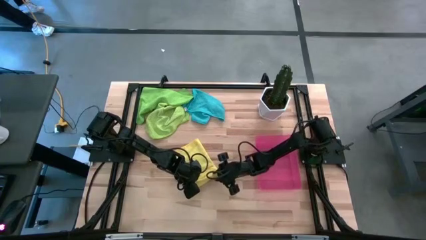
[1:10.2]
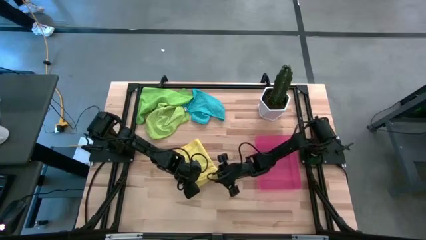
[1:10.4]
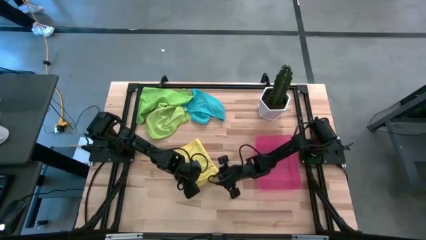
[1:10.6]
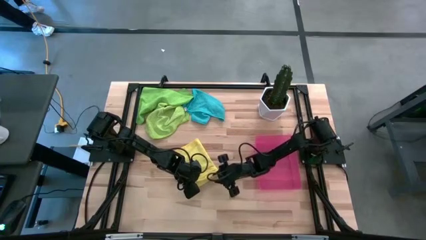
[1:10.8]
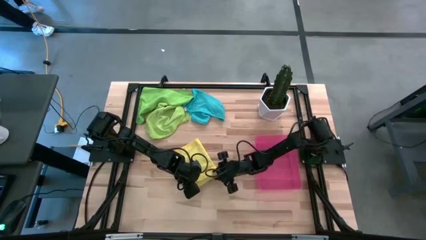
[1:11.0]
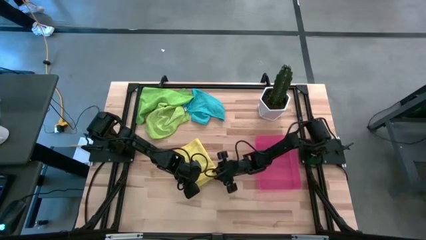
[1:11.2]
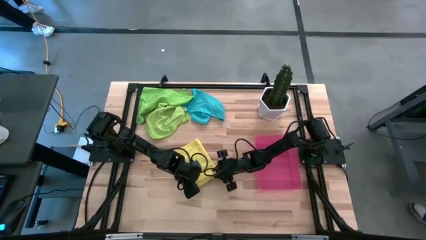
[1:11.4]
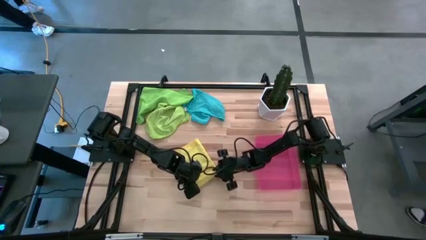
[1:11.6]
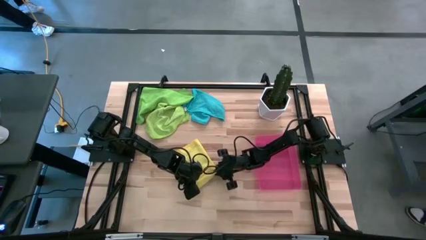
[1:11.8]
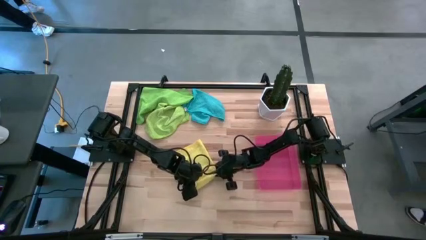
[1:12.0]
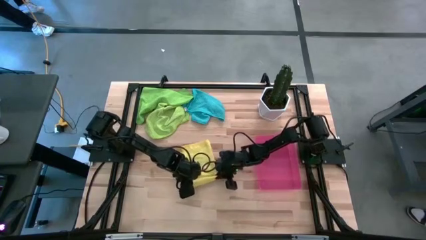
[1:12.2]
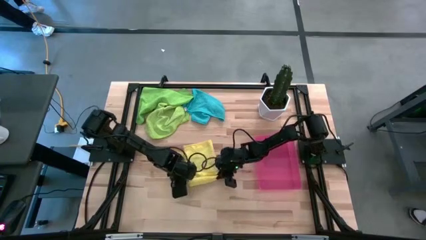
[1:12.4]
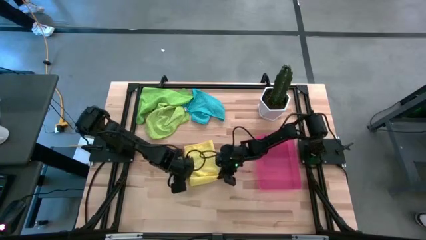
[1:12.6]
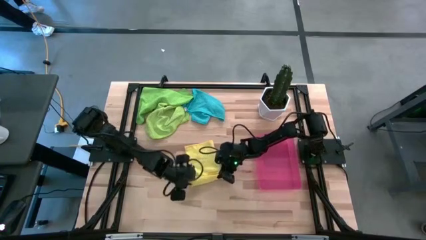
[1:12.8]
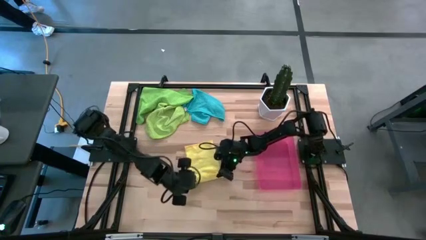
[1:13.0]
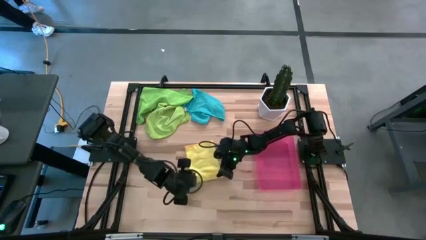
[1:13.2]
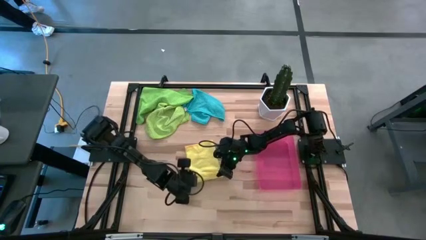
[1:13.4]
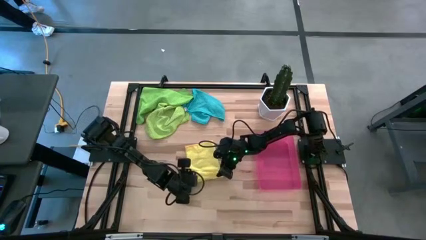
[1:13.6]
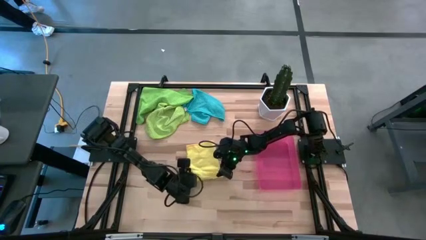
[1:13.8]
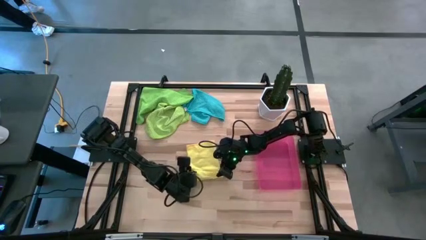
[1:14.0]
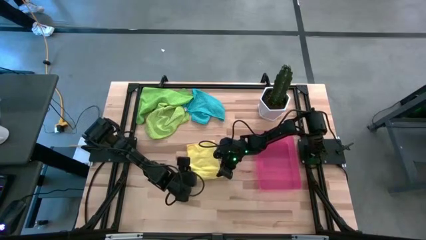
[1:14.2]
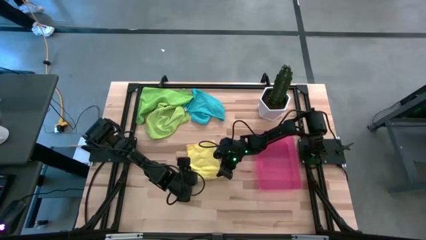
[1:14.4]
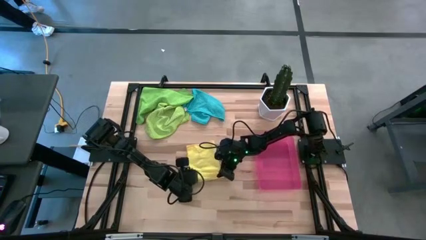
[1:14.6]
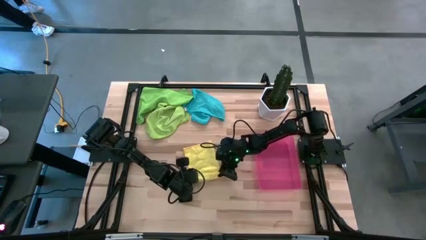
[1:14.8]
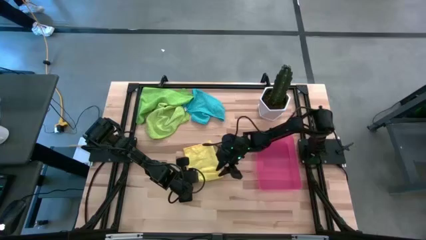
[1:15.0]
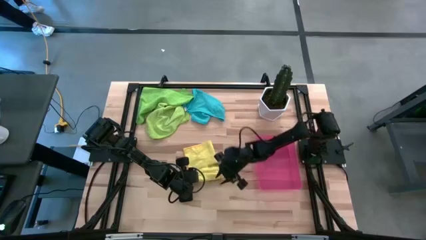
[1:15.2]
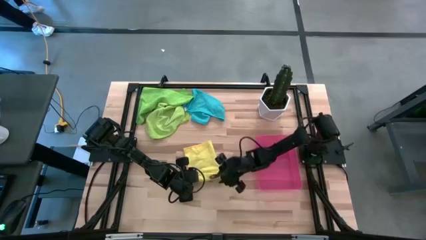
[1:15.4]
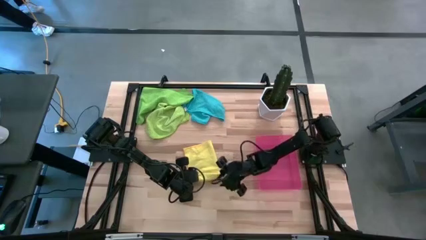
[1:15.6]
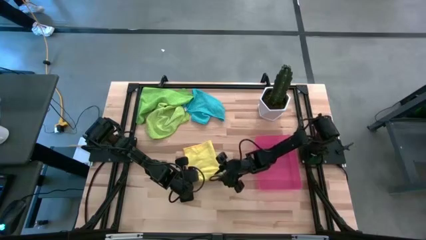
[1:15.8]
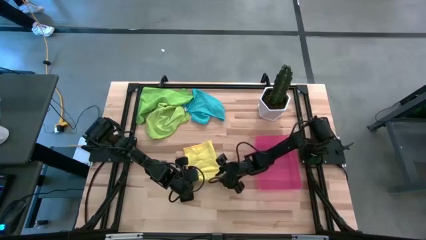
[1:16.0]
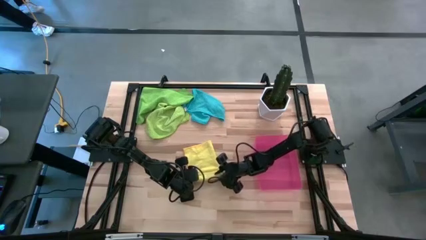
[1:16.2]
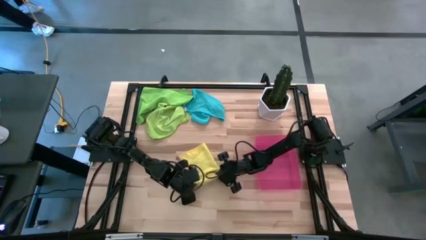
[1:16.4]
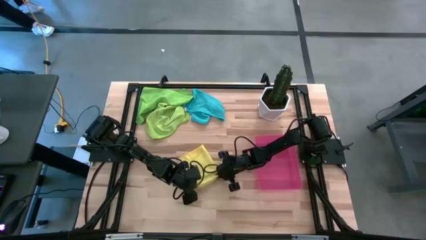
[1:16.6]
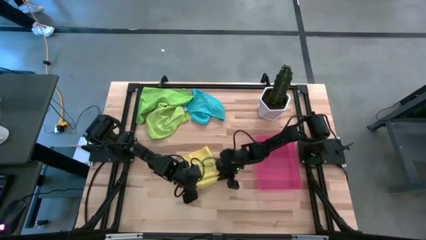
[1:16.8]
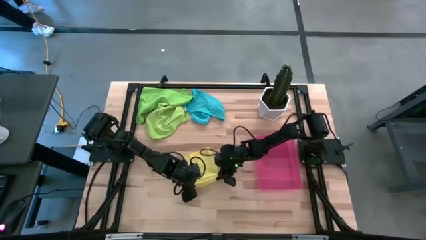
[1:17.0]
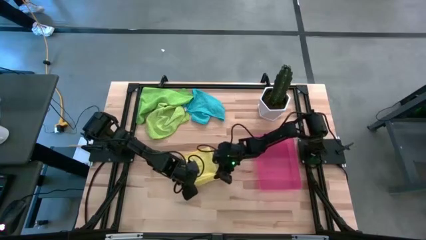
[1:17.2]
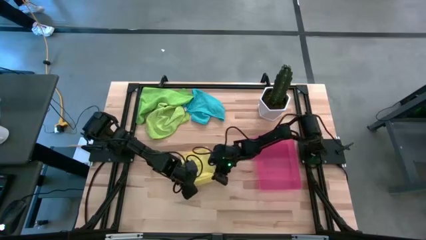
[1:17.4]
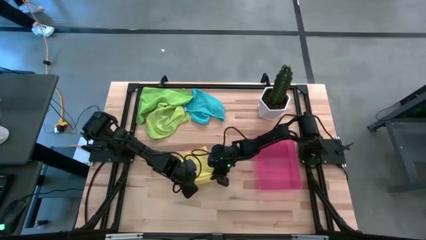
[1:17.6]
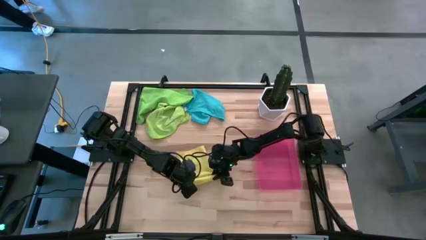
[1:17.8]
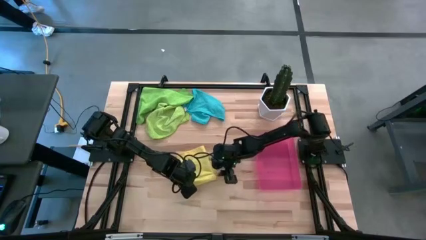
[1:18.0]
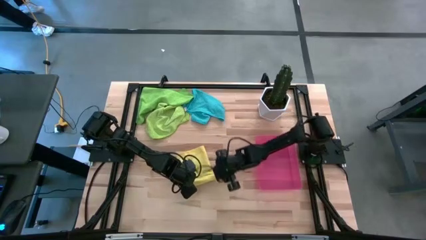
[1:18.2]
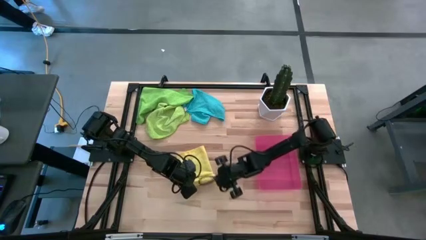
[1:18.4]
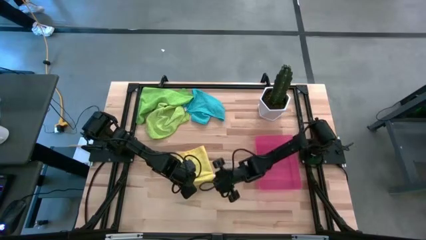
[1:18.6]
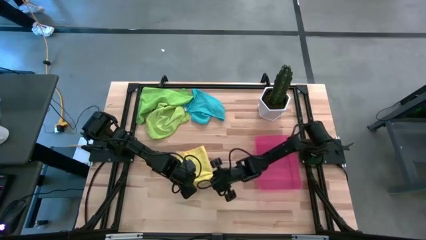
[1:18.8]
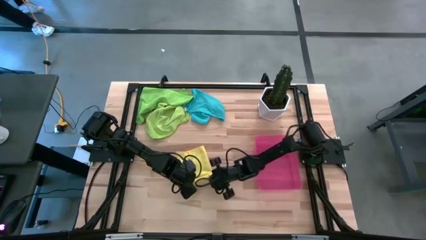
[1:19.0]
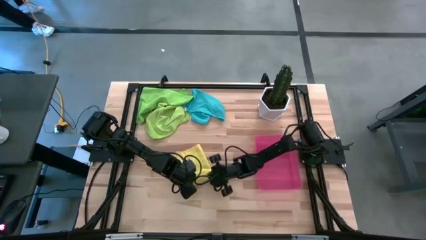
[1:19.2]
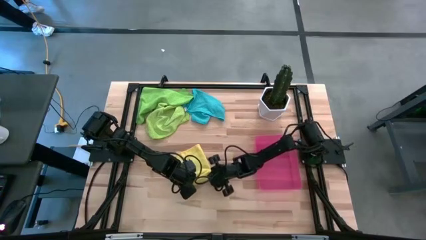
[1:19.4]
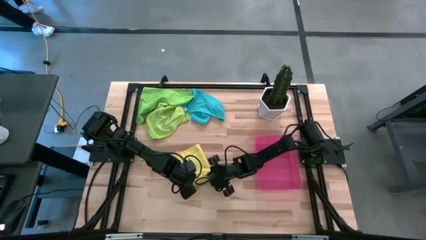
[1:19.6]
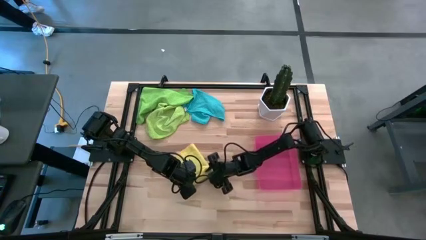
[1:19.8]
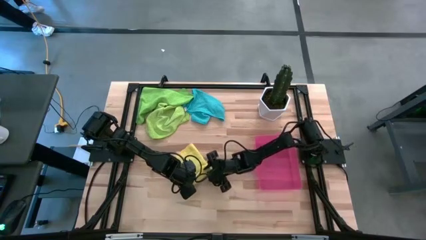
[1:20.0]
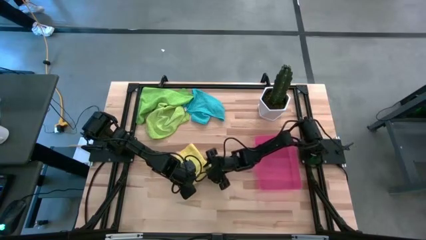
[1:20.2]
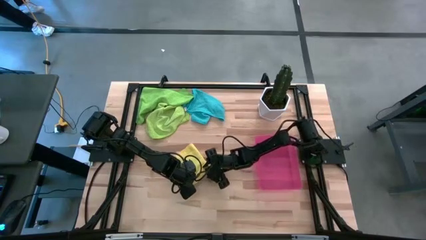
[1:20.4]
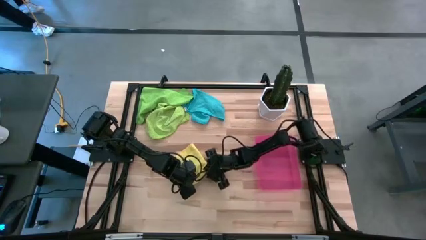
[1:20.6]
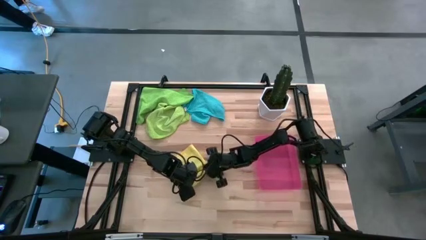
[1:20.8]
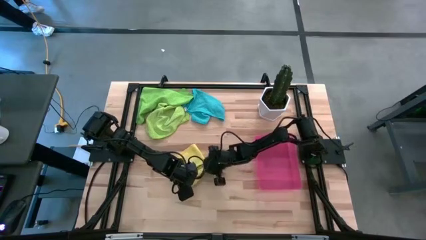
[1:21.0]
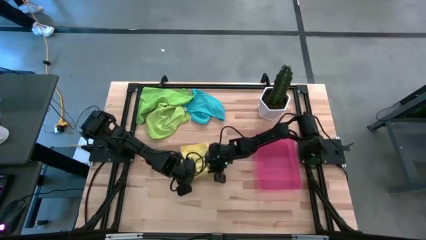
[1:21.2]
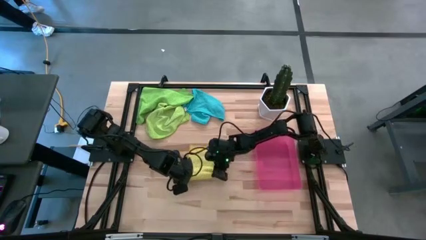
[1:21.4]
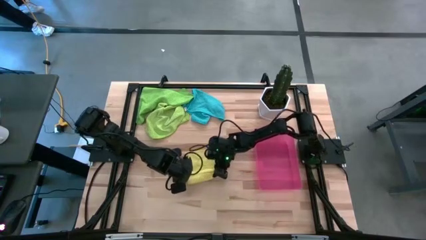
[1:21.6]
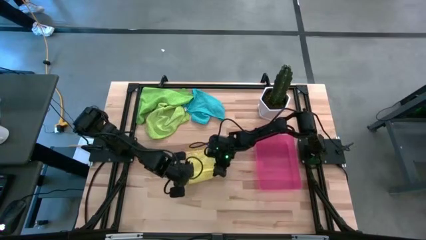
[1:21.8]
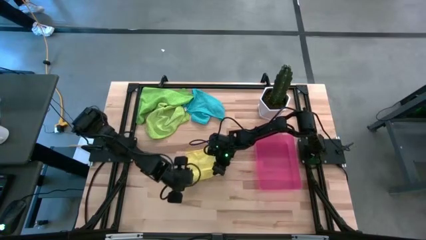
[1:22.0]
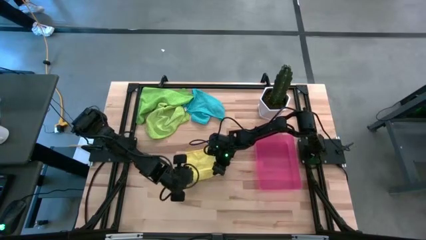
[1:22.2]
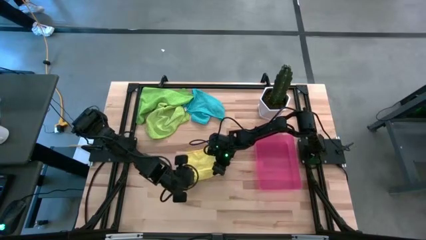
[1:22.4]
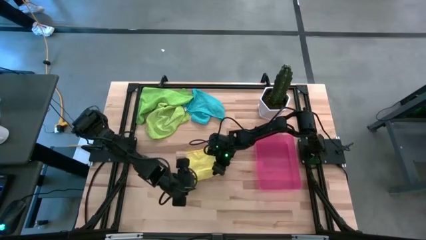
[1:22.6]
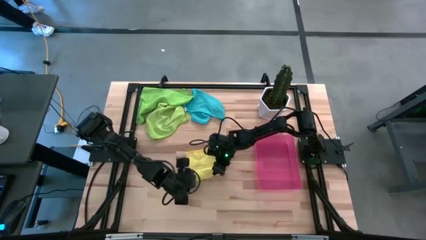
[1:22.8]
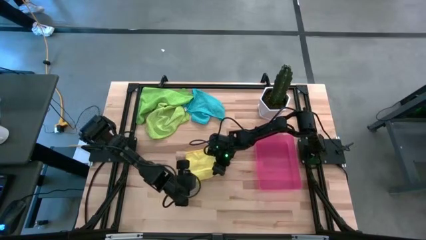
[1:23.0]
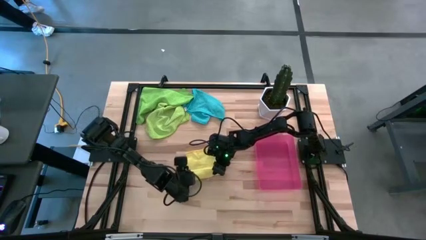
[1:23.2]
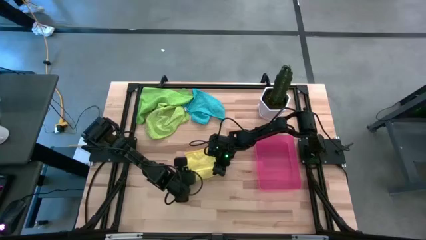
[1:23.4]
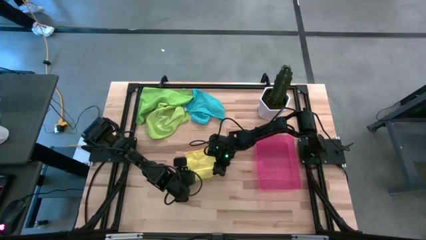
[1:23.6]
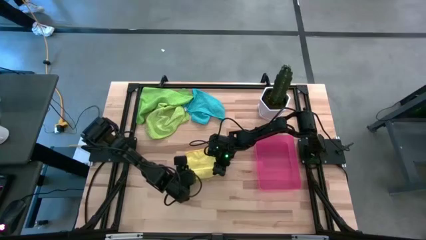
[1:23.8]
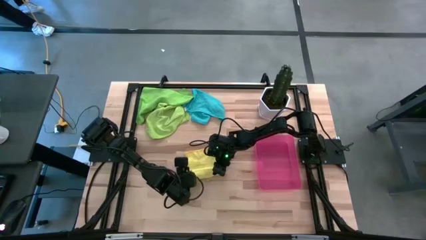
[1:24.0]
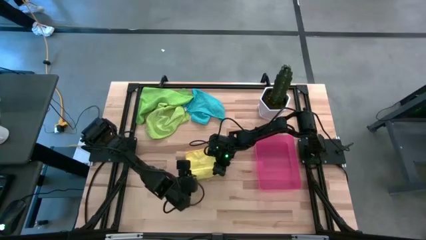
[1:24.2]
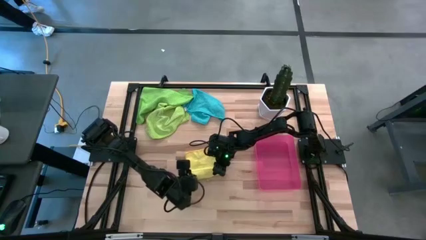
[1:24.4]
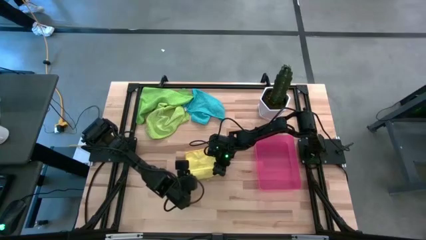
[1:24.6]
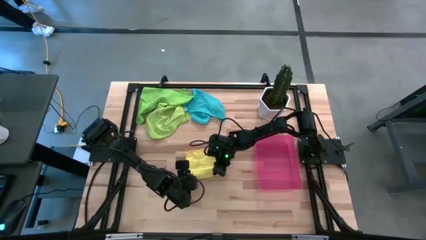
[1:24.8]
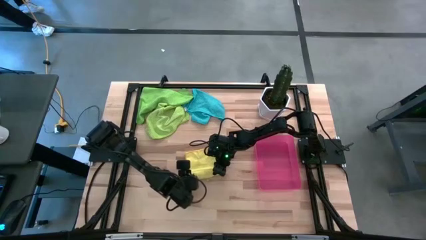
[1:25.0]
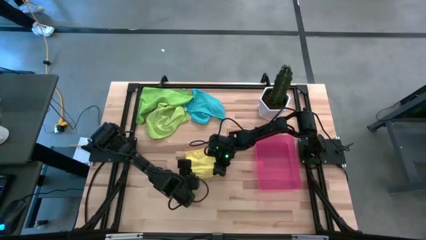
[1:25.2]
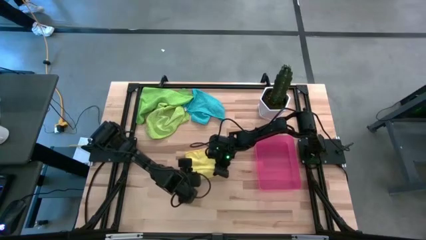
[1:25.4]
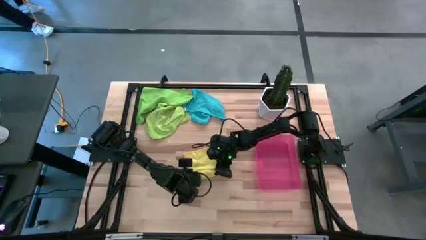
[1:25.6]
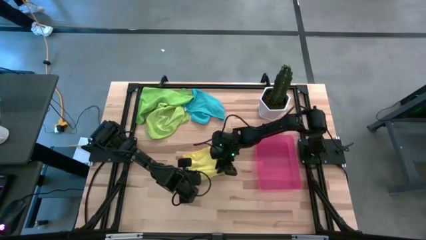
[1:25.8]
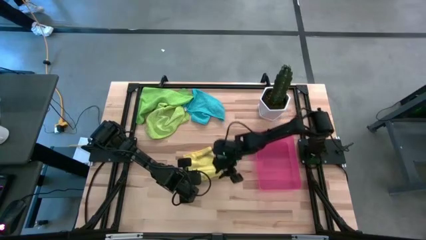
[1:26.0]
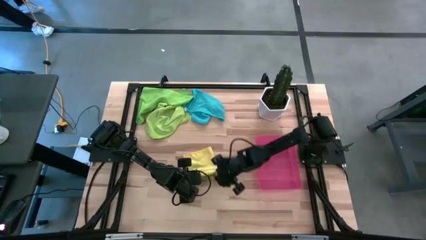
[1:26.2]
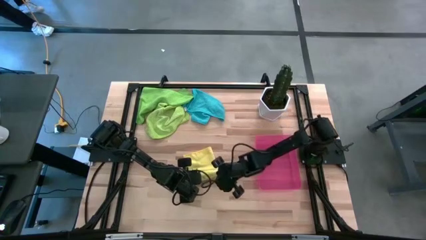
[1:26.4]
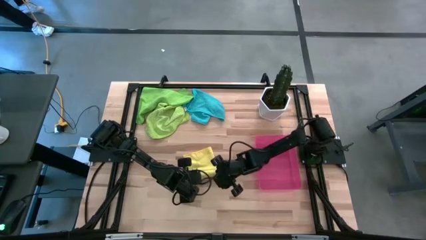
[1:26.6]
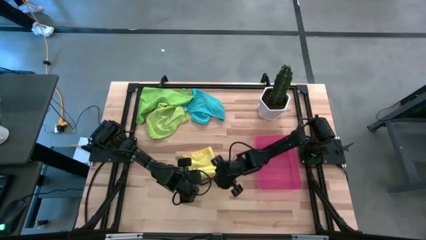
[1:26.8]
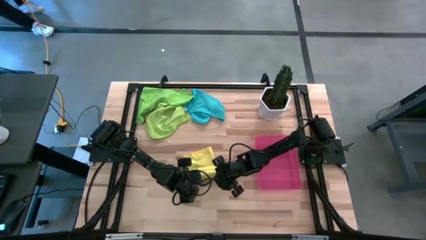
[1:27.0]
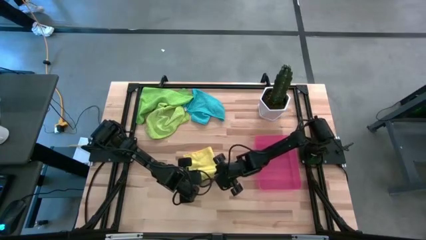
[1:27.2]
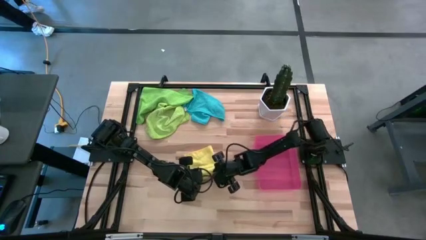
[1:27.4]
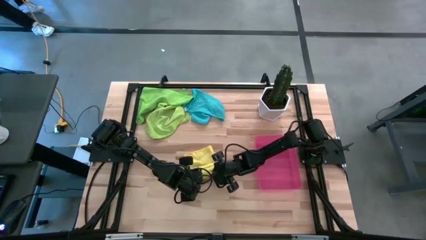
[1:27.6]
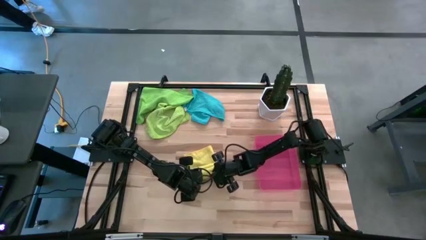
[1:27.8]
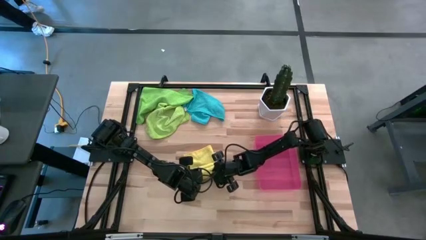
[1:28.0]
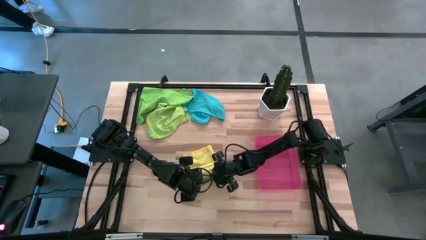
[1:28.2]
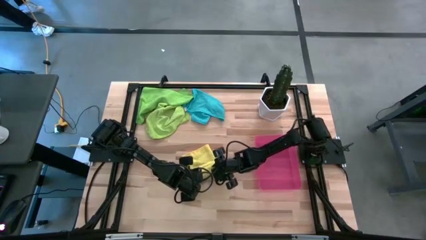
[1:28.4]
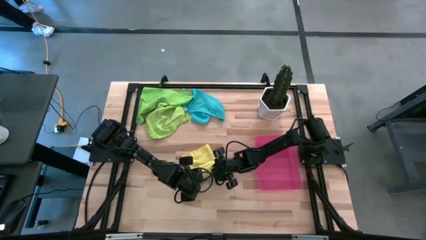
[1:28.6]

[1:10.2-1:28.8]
Task: Roll microfiber towels into tight, uniform cylinder then place into a basket
Roll the yellow microfiber towel
